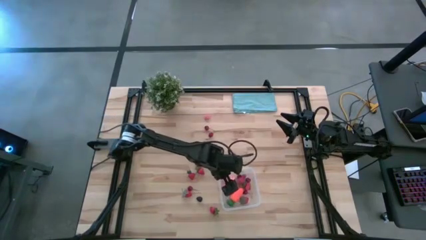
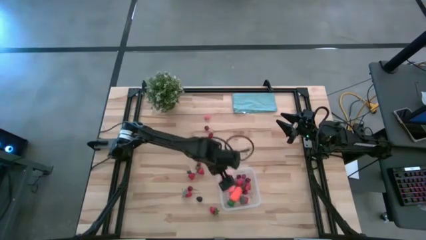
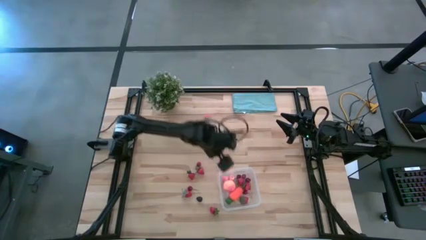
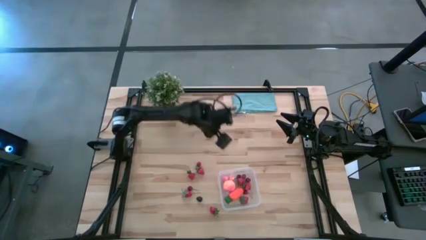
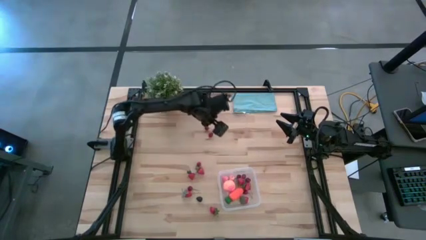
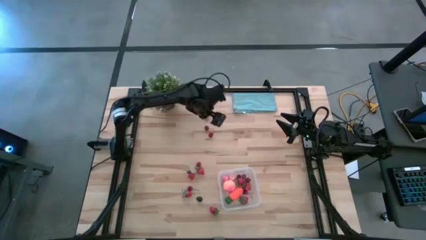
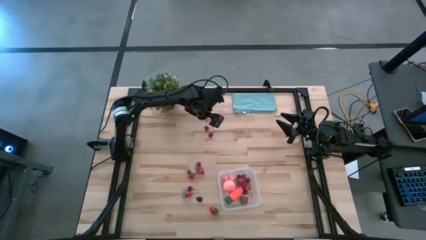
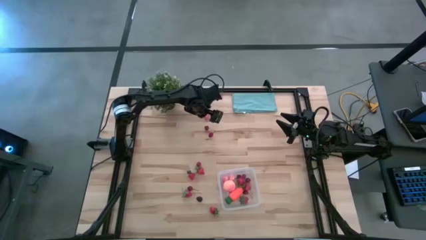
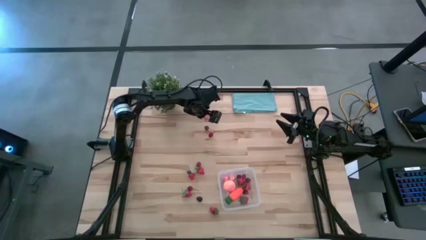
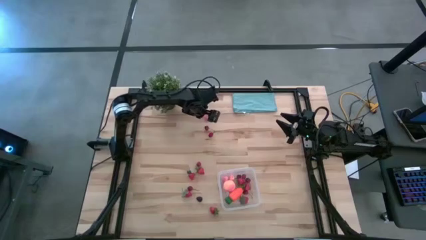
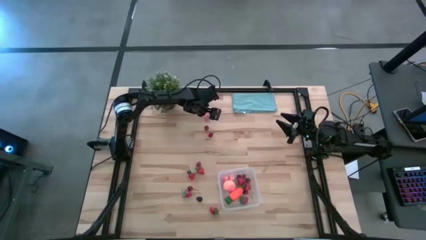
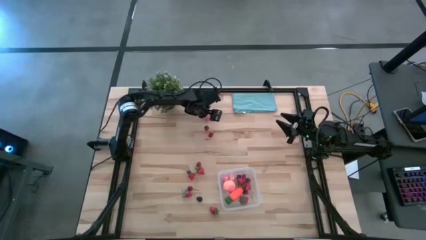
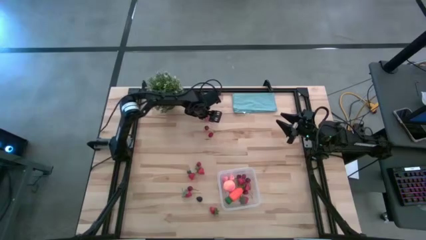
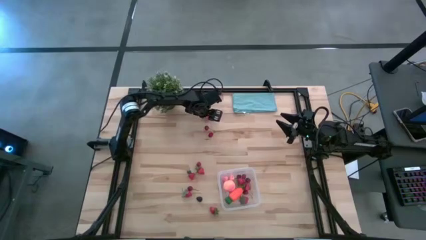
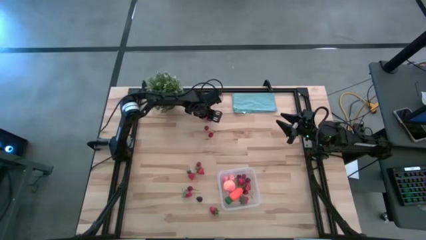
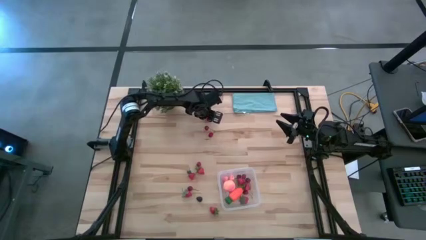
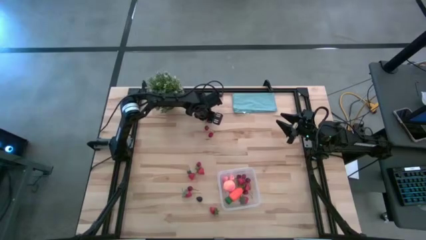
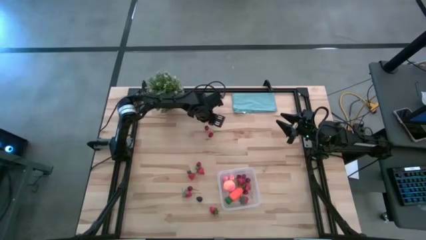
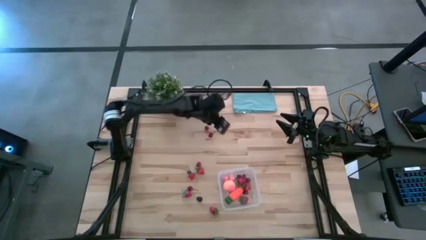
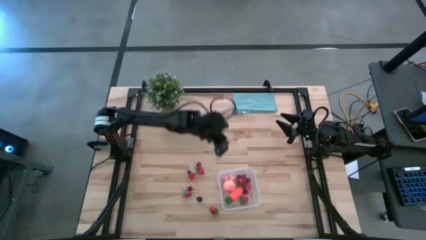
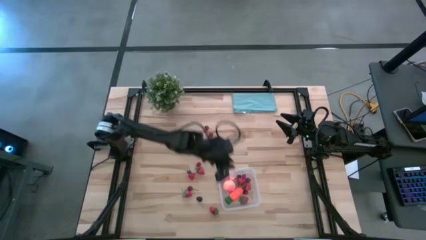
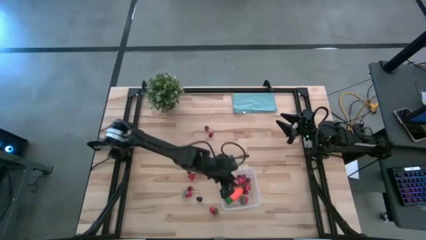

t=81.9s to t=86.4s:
Task: Pick and placing Produce into tupperware
Put the pink peach into the transparent container

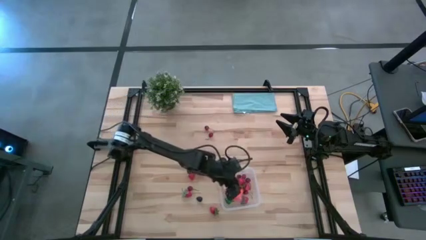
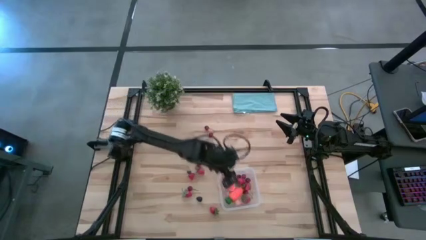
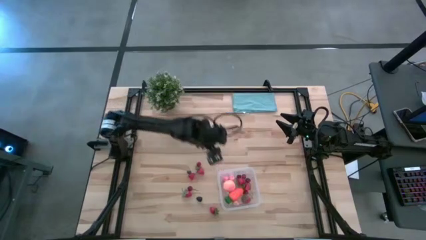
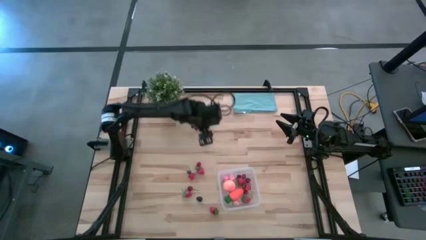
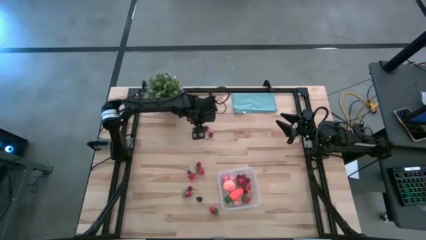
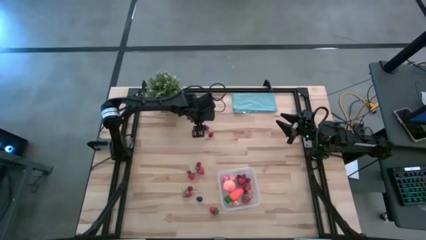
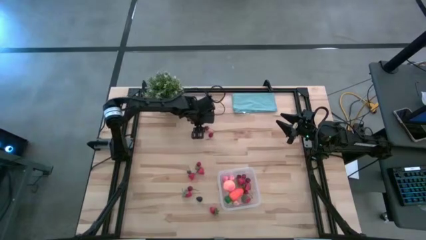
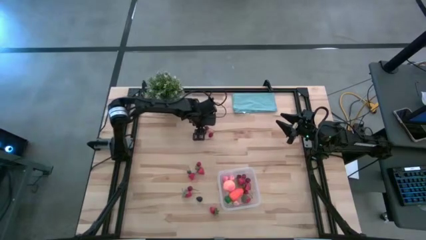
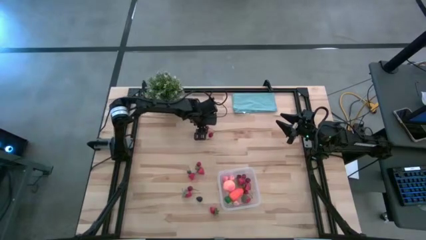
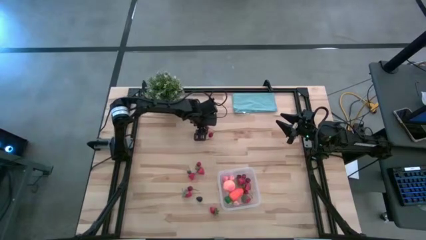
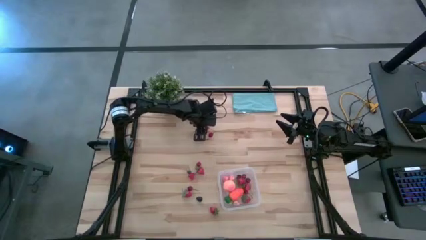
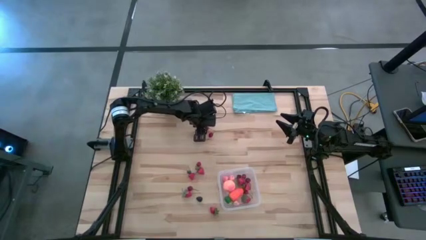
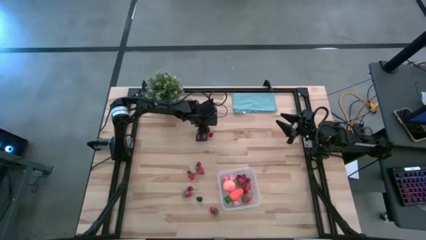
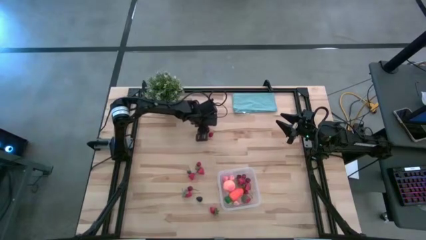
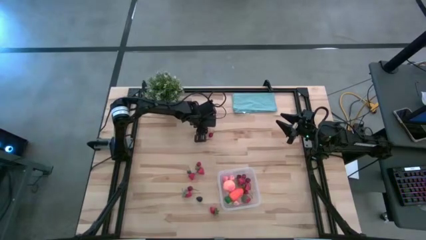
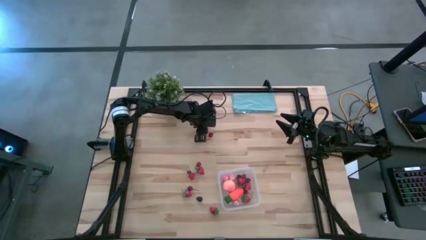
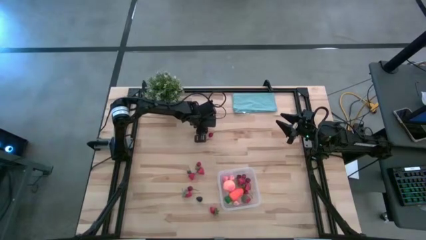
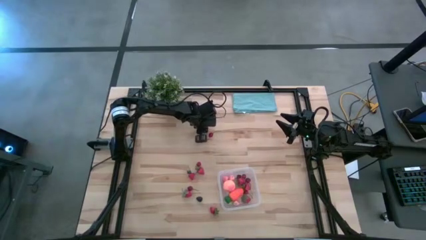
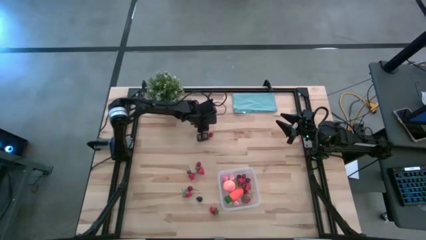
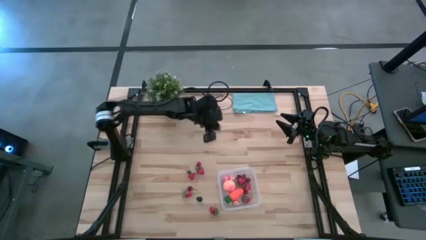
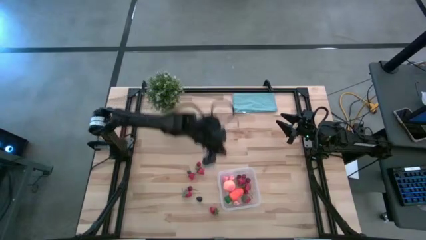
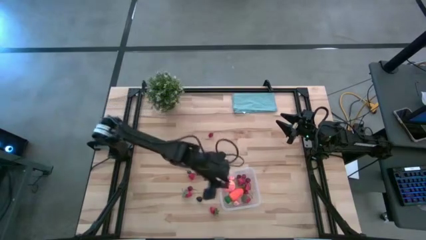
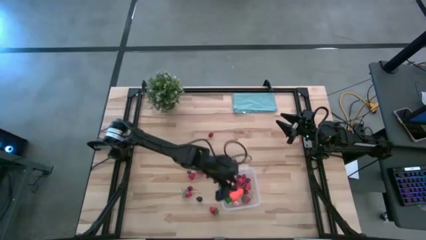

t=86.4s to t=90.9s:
Put the red cherry into the transparent container

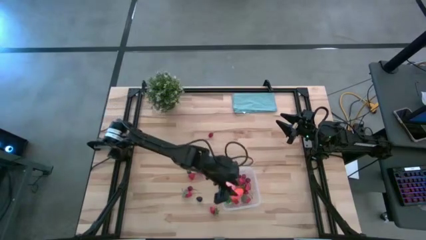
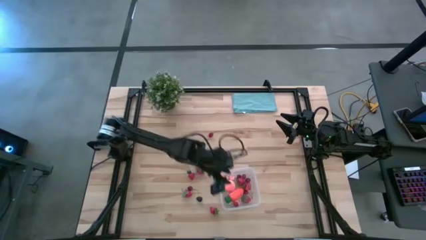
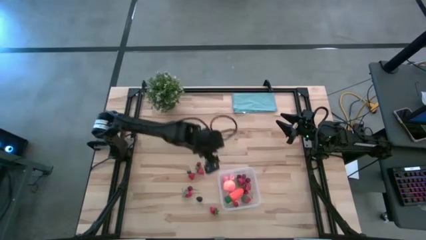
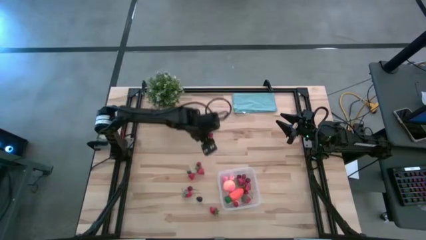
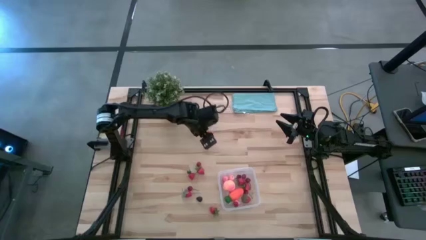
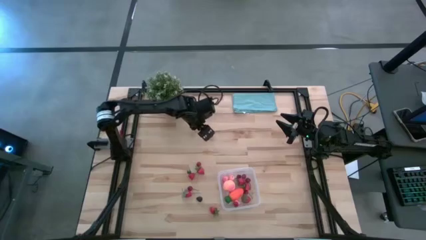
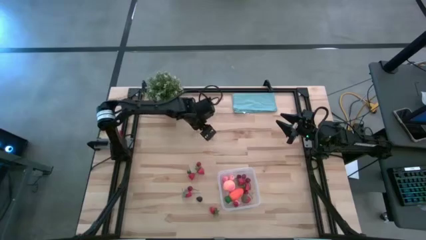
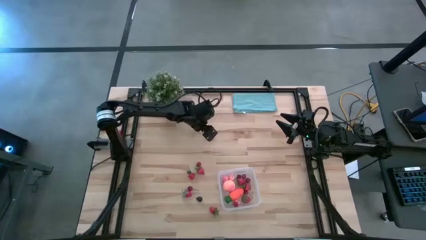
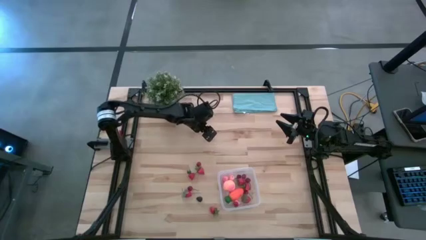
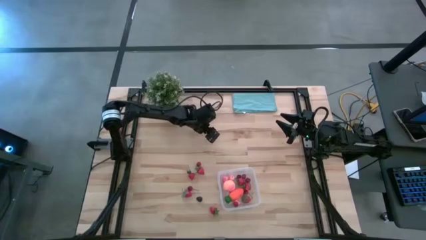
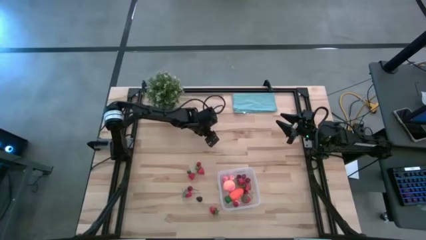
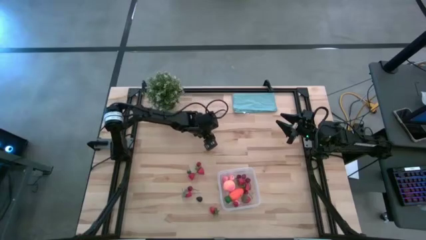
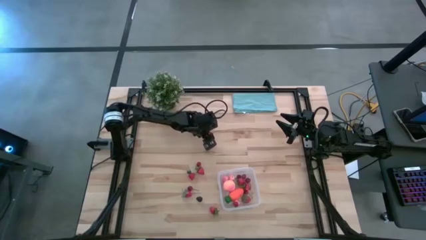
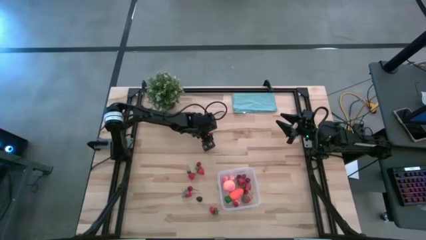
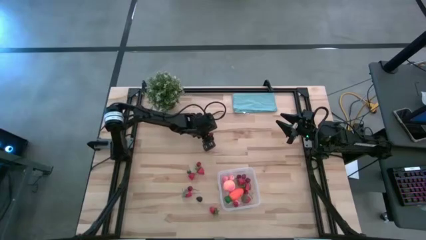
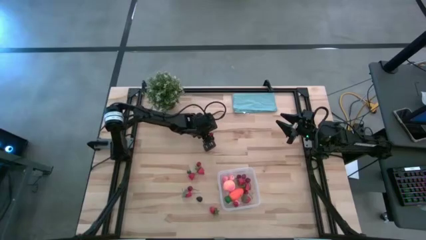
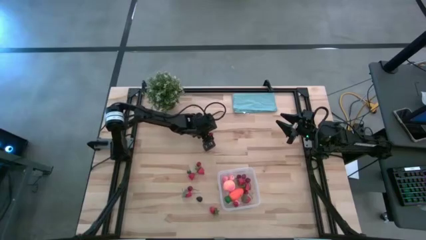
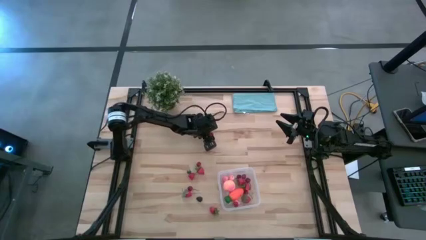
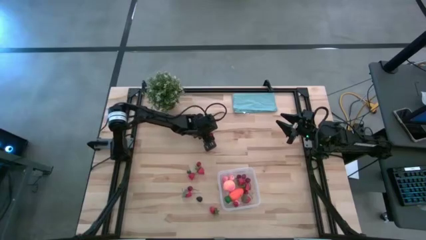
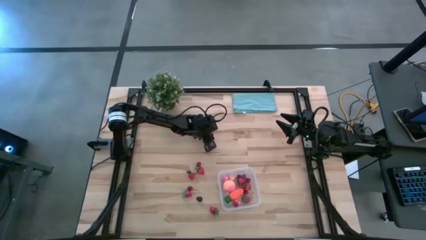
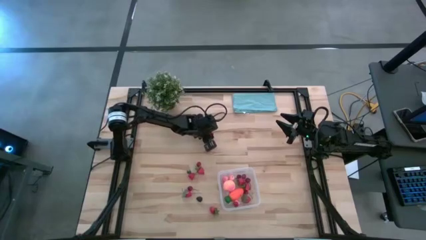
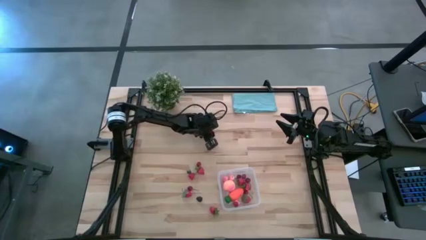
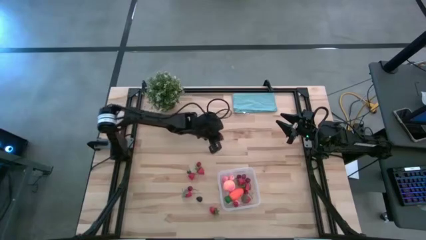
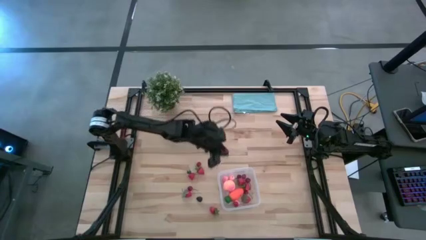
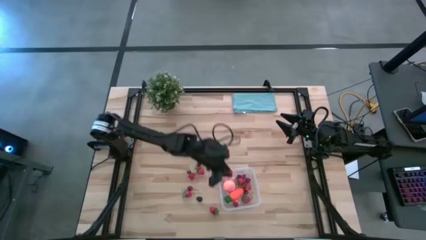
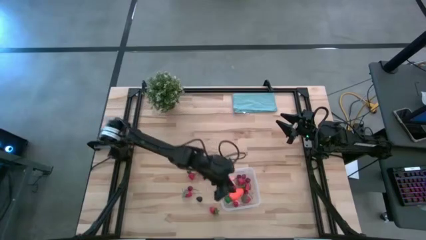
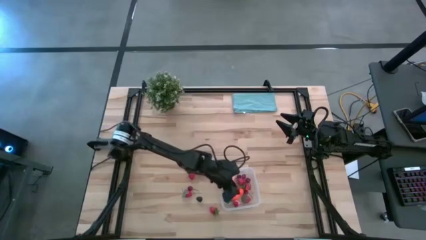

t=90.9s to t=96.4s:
Put the red cherry into the transparent container

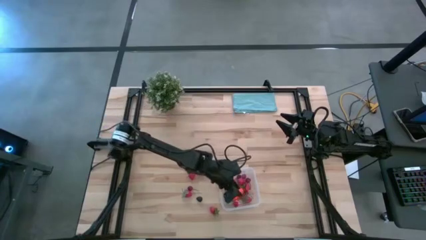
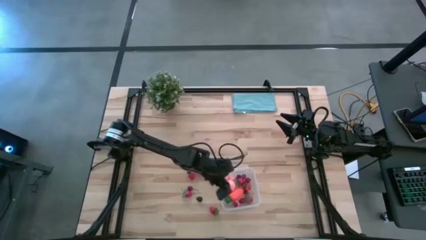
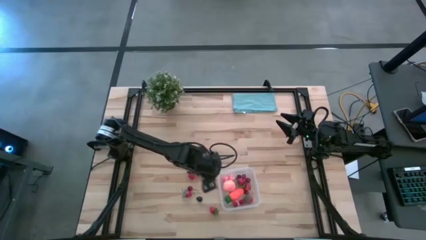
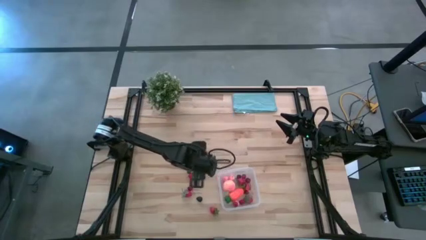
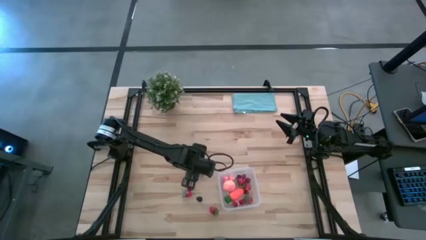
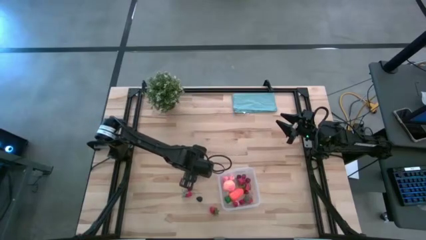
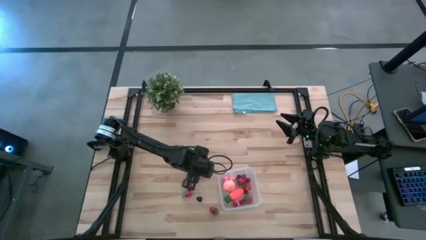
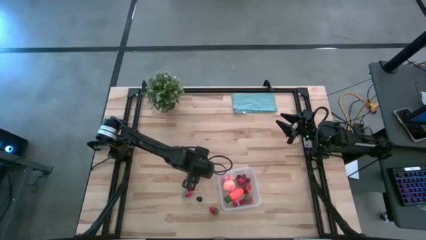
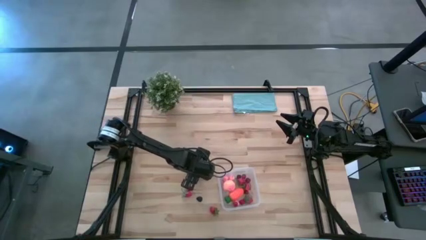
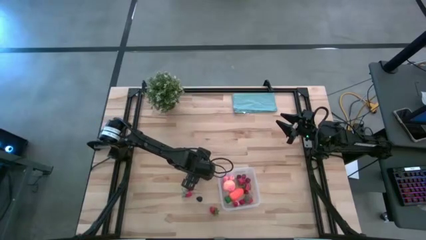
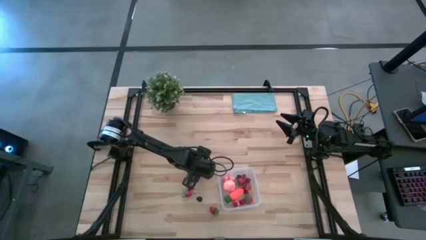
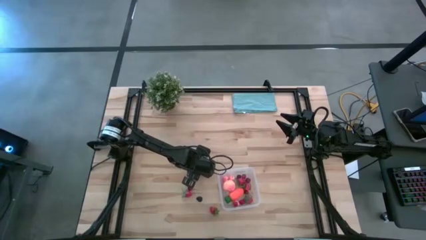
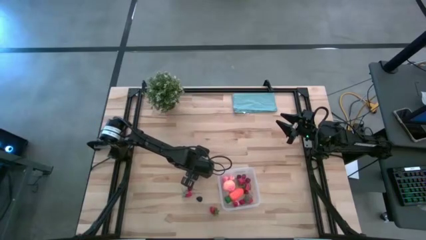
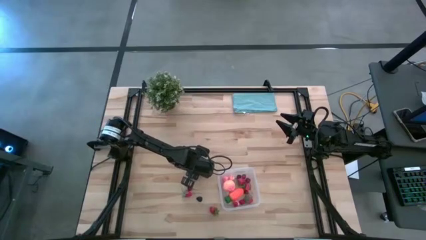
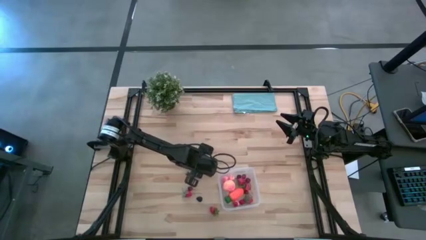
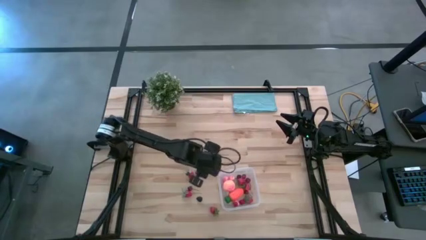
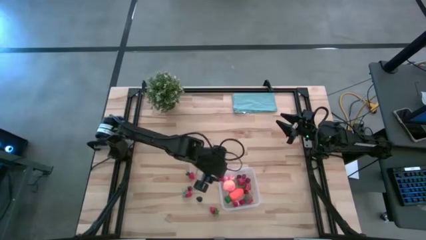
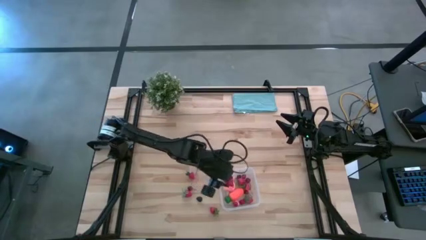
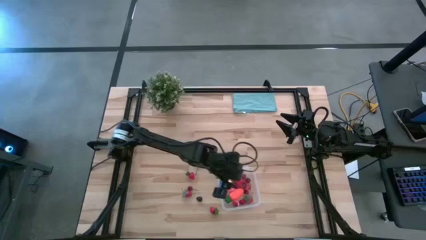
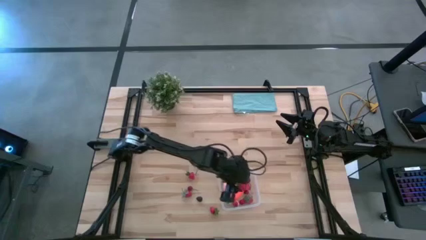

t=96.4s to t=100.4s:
Put the red strawberry into the transparent container
